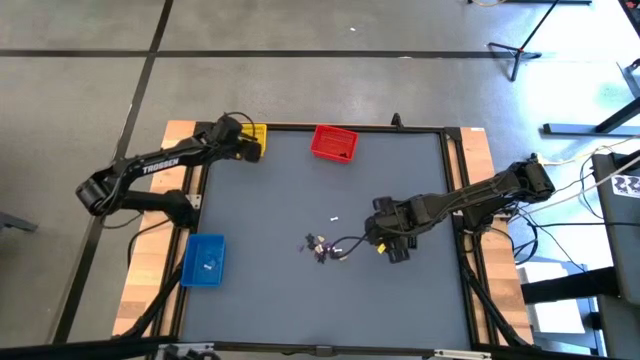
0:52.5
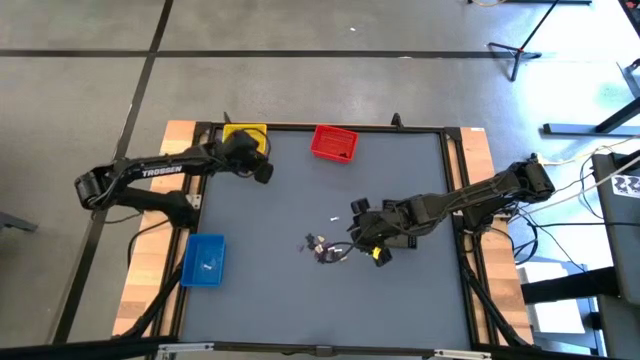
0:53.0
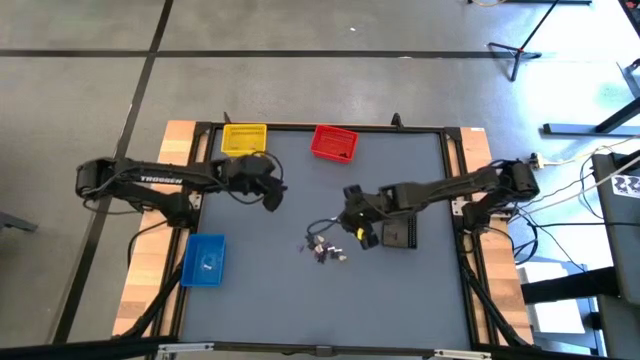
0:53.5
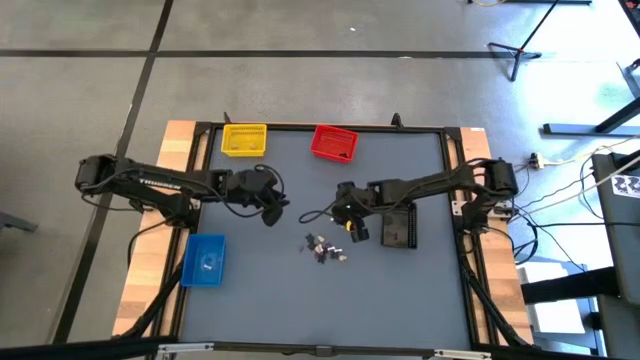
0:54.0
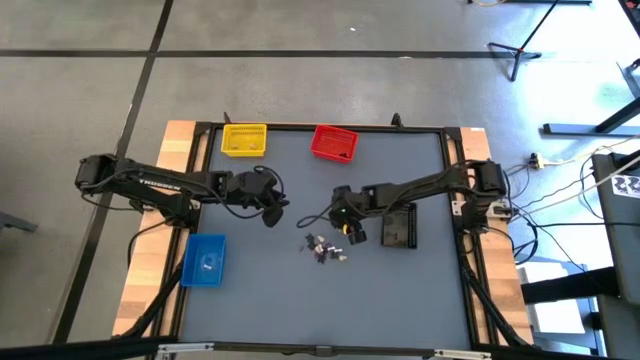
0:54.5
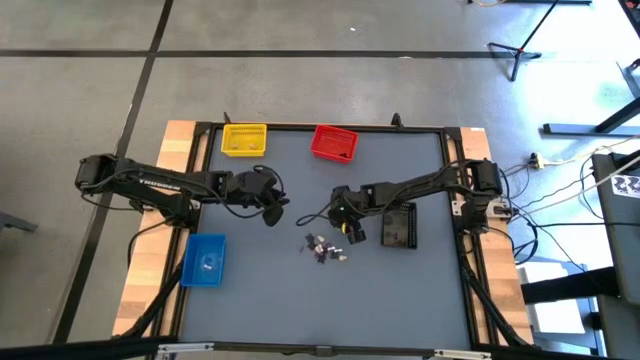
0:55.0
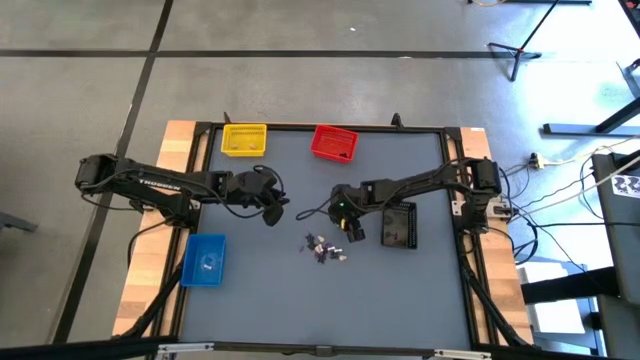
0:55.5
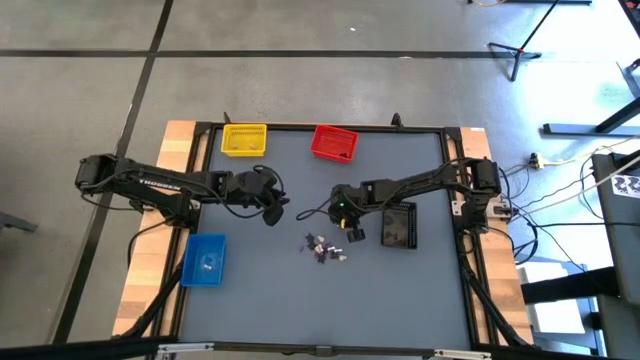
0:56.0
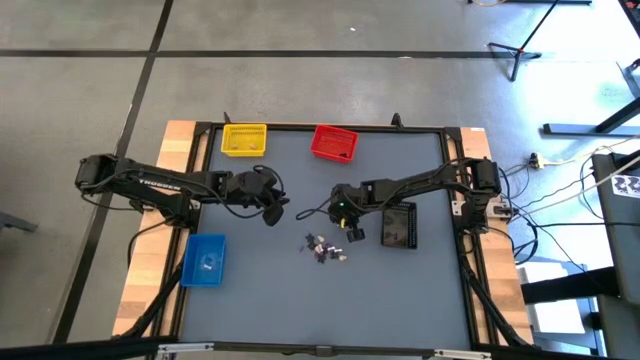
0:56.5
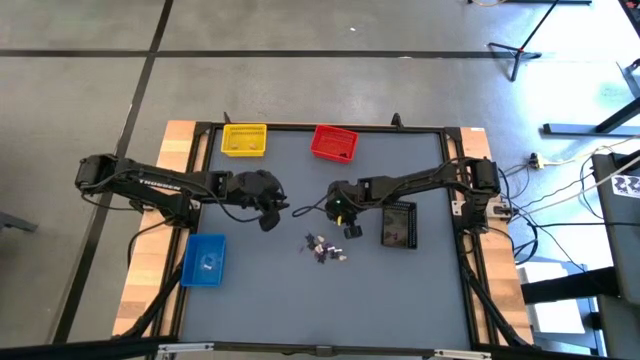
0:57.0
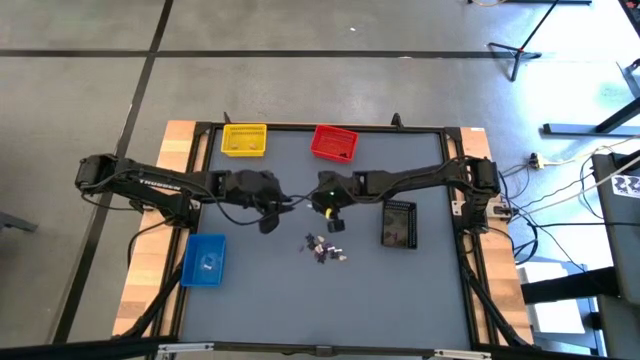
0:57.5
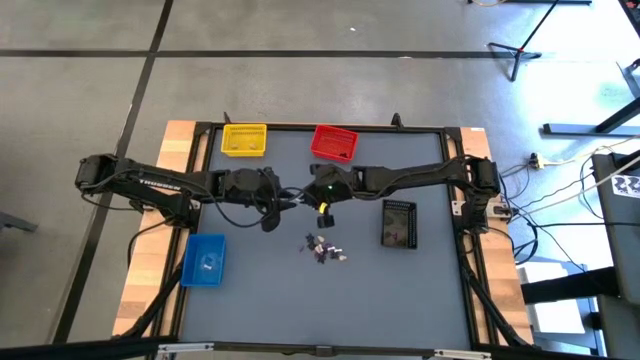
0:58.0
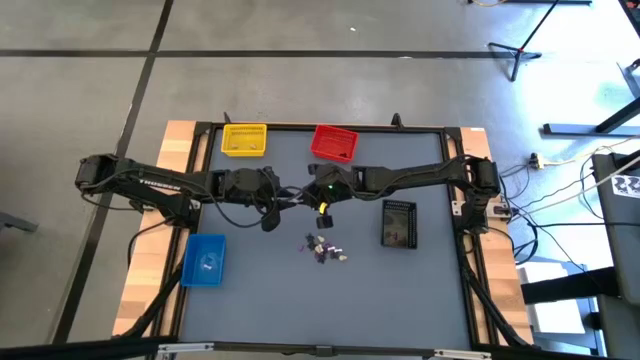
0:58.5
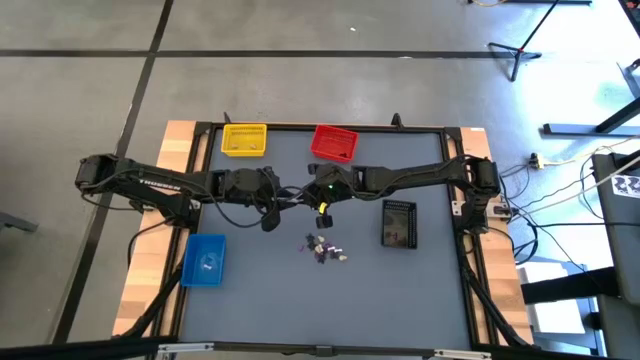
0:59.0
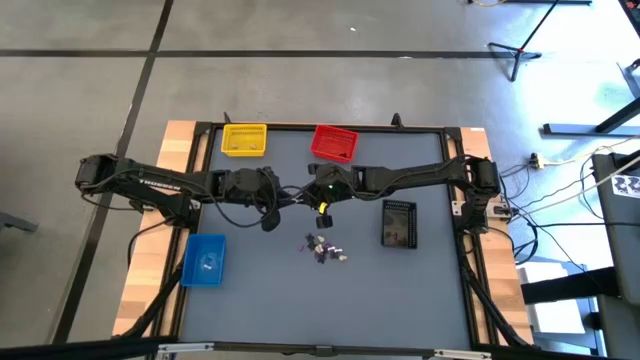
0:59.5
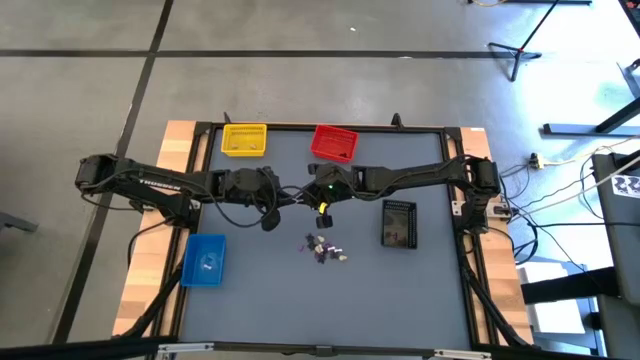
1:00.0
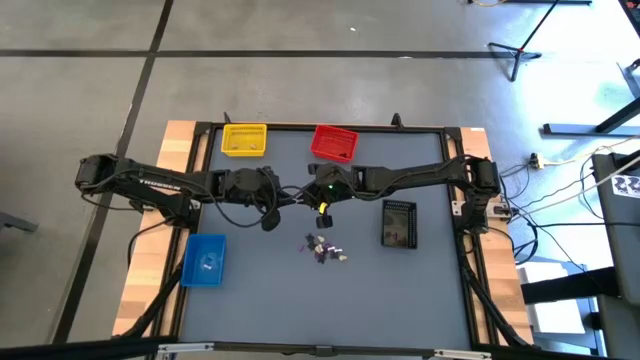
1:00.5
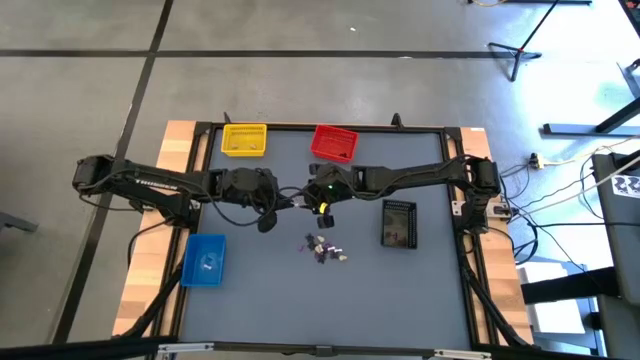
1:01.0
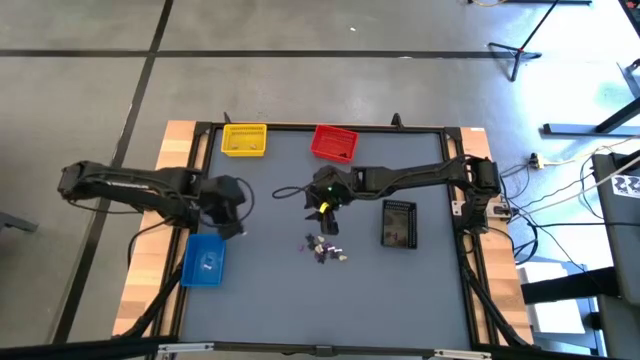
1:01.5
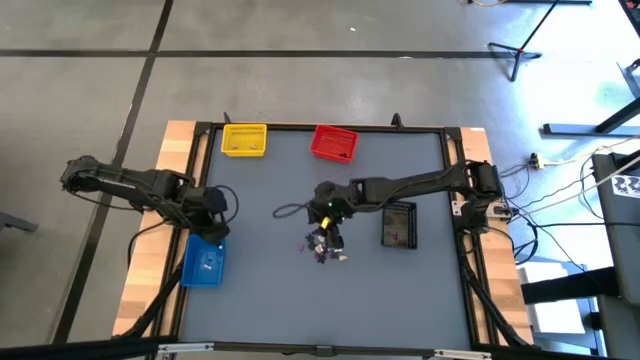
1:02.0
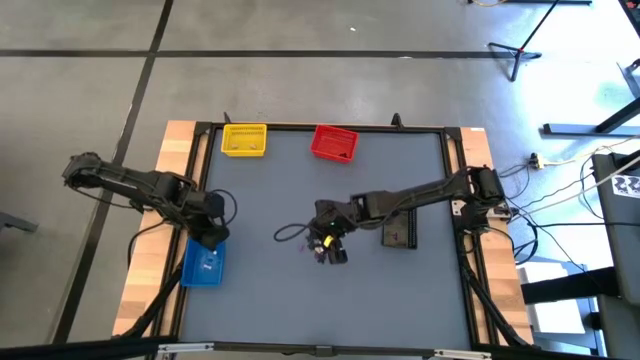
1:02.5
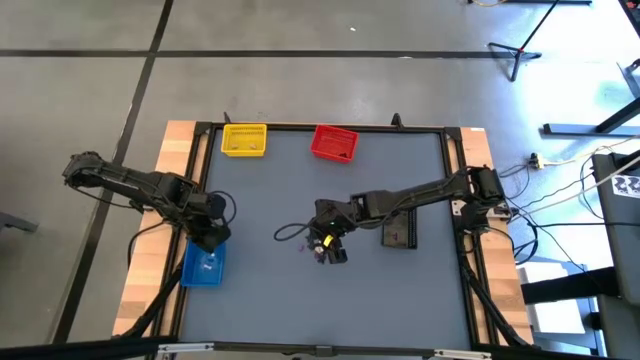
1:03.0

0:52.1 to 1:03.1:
Task: Sort Halloween decoration
Put the white bone toy into the blue bin

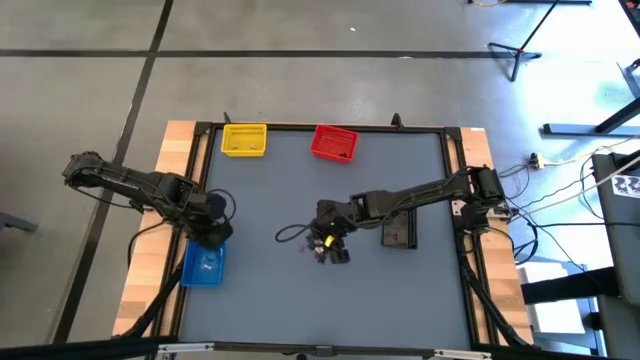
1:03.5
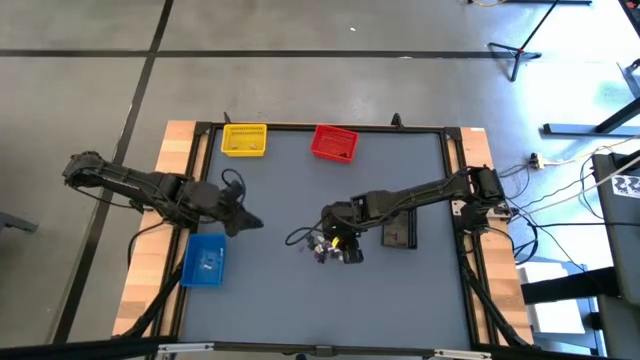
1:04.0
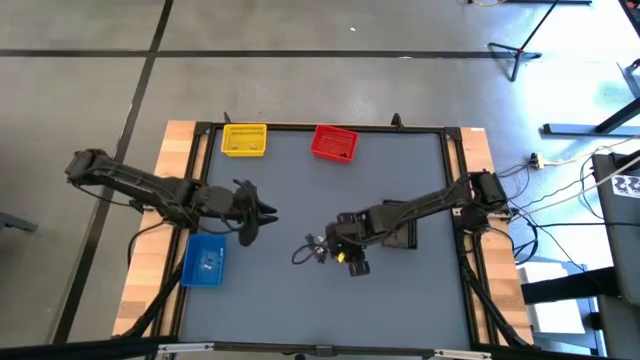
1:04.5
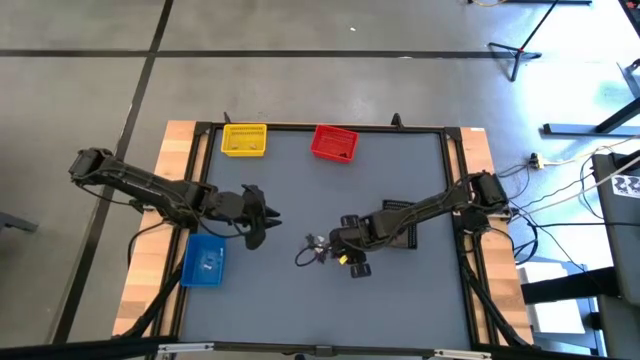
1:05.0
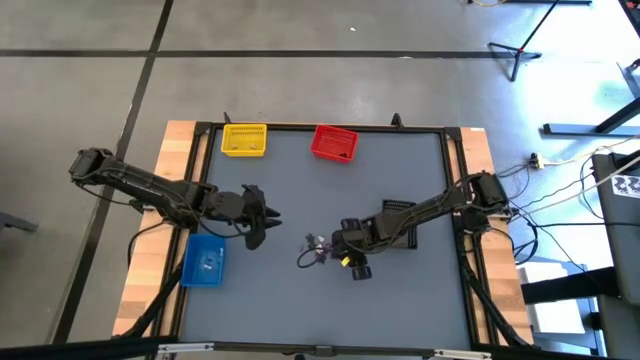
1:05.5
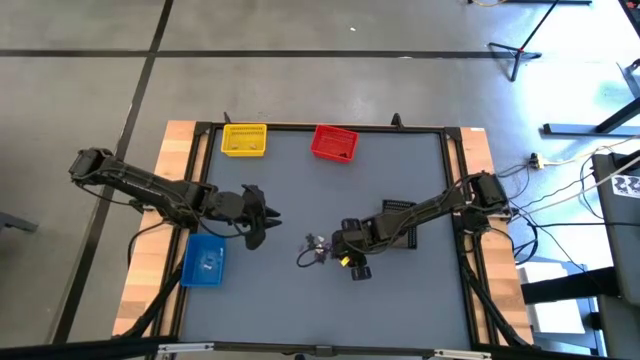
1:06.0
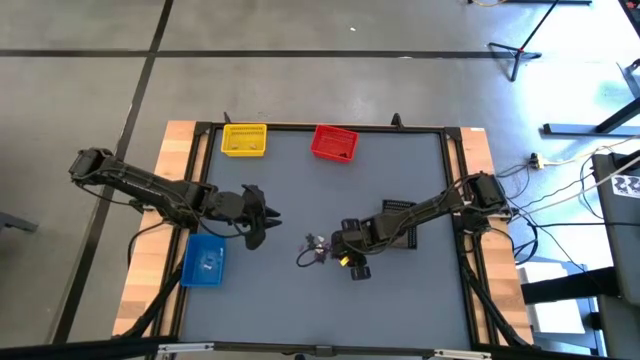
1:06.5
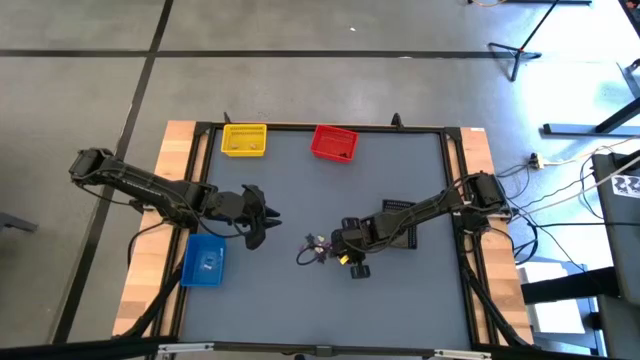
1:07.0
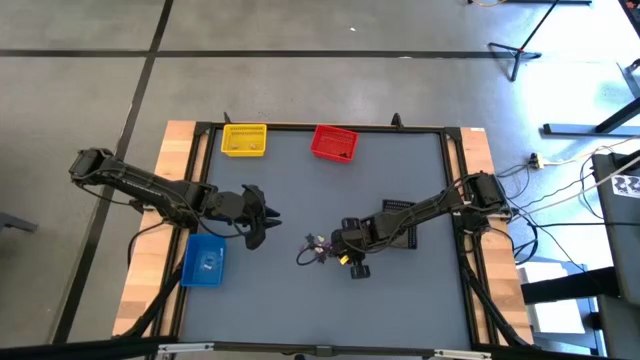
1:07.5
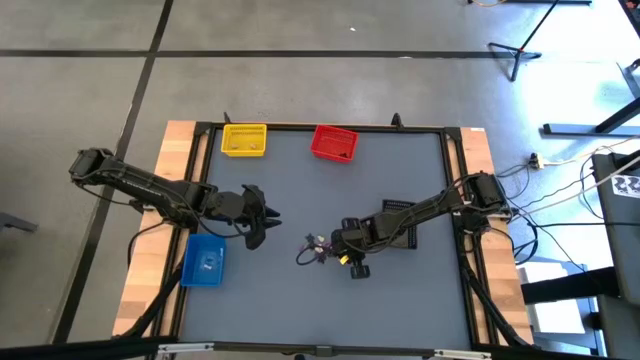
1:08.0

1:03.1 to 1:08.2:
Put the yellow skull toy into the yellow bin

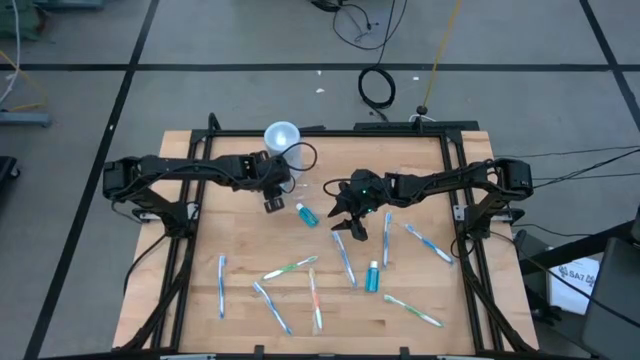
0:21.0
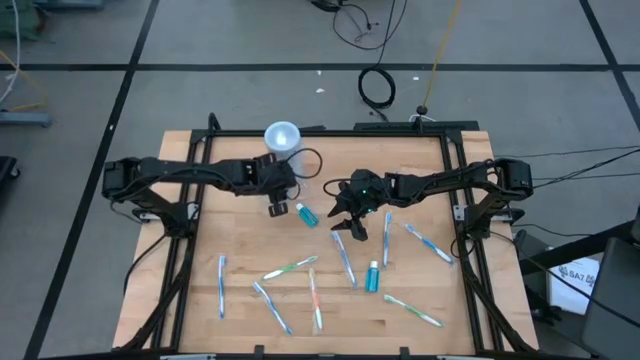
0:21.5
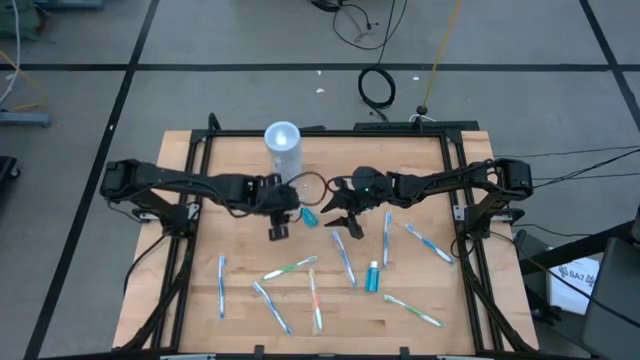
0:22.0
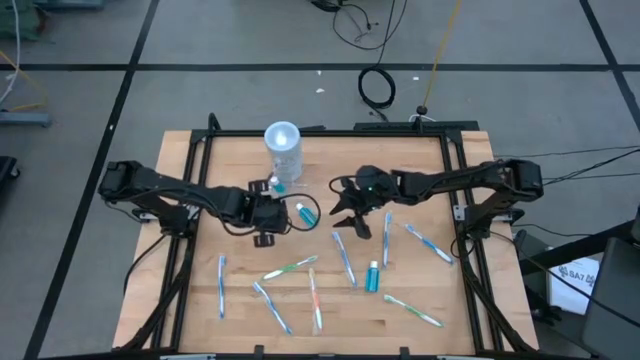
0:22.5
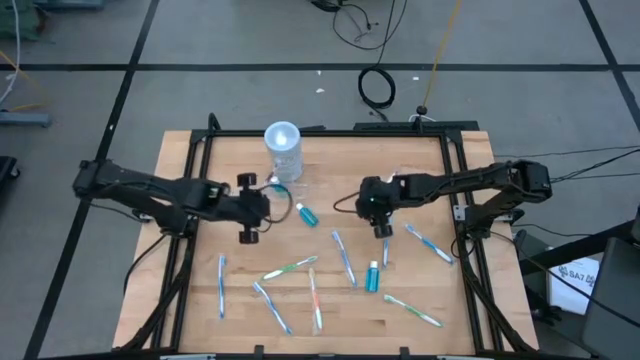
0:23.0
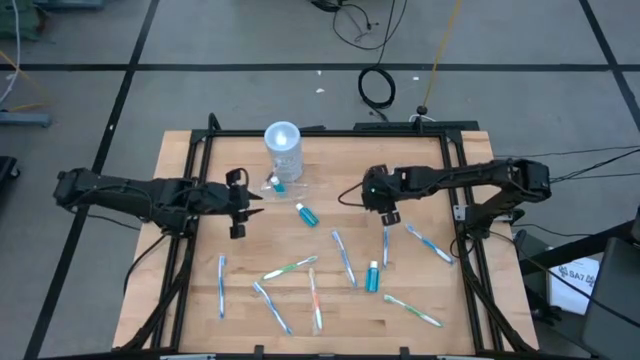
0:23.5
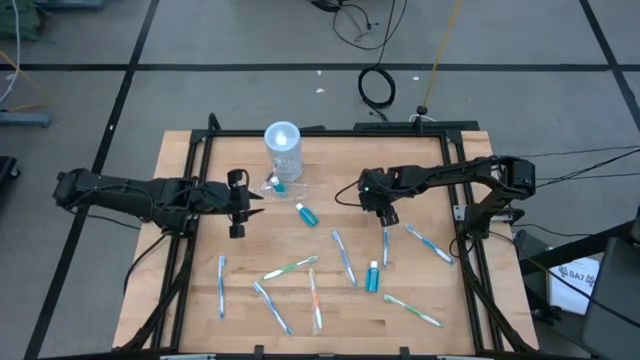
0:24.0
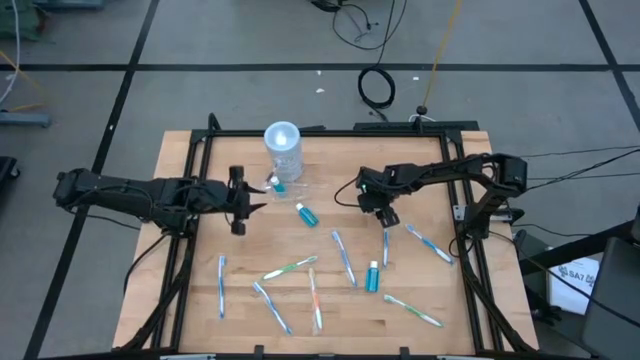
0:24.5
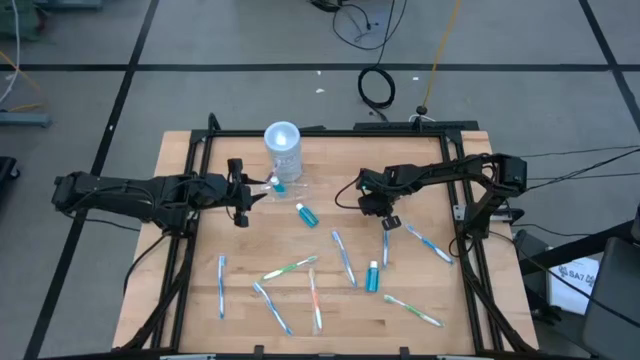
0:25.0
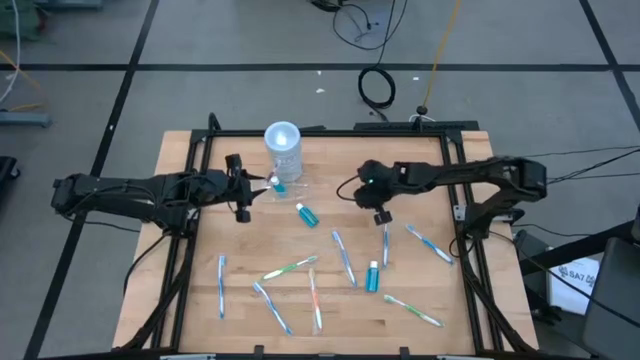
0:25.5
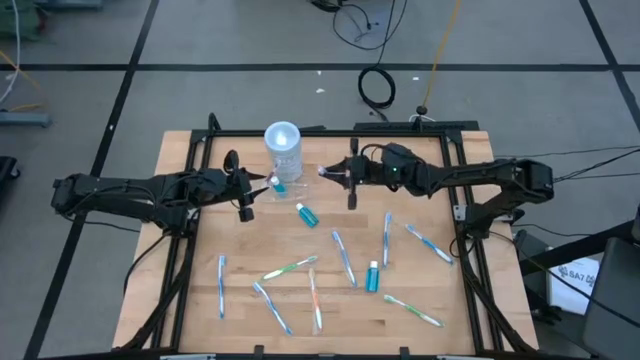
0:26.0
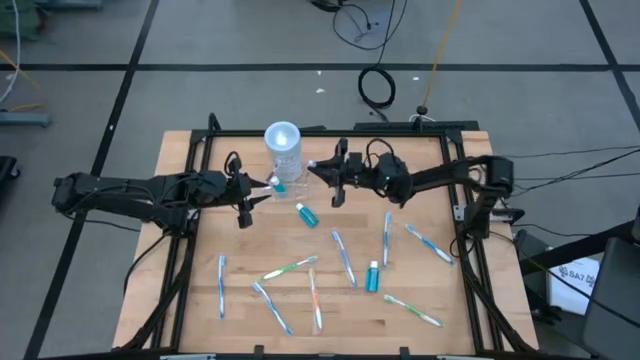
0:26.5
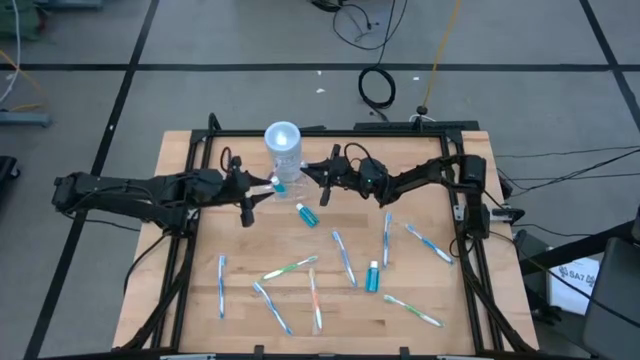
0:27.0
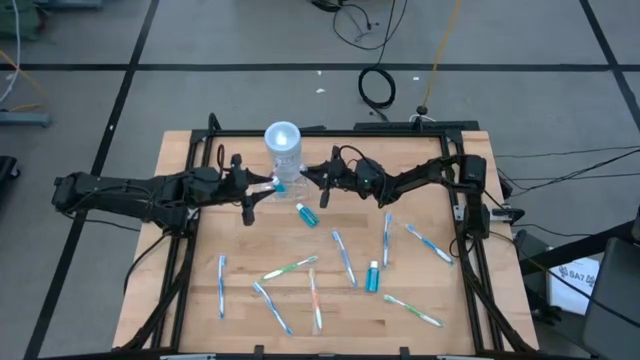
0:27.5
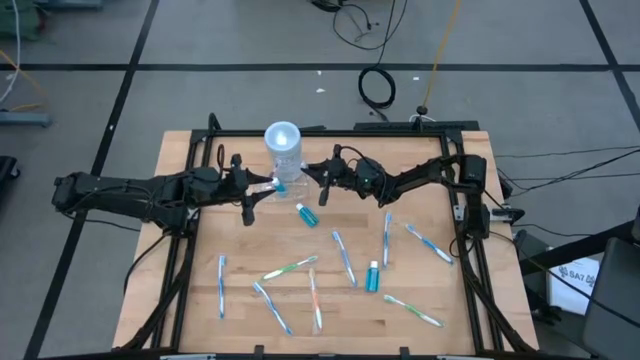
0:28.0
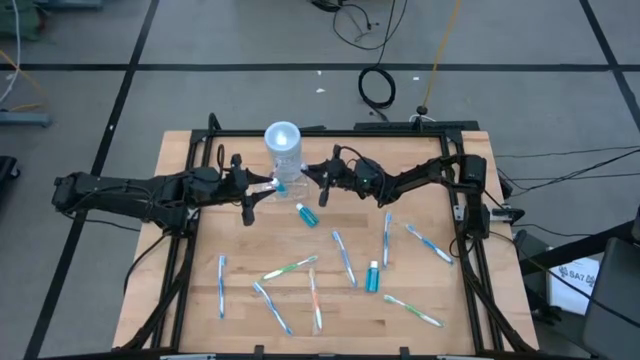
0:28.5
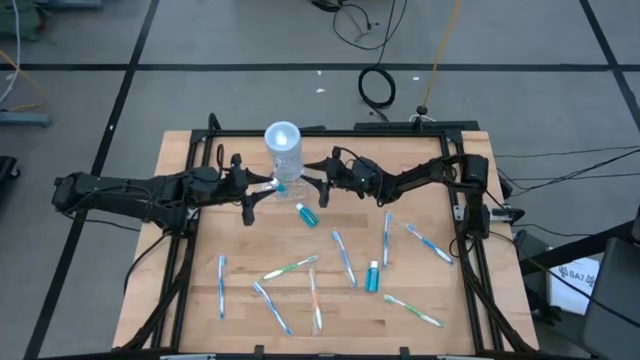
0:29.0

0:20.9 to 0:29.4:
Task: Pick & Place toothbrushing station
Put the purple toothbrush into the transparent organizer
